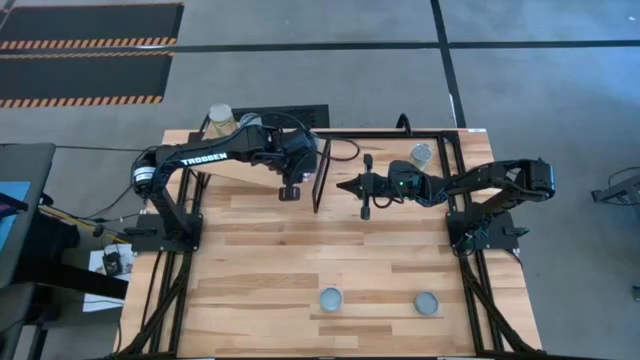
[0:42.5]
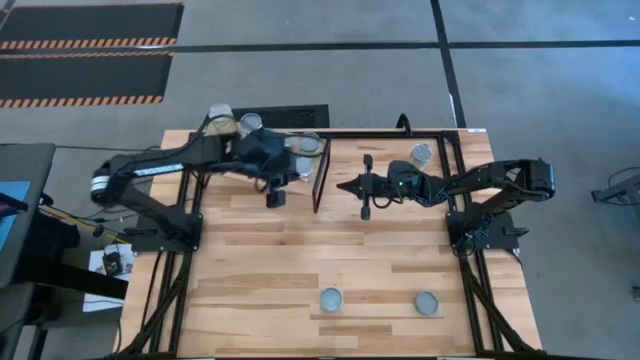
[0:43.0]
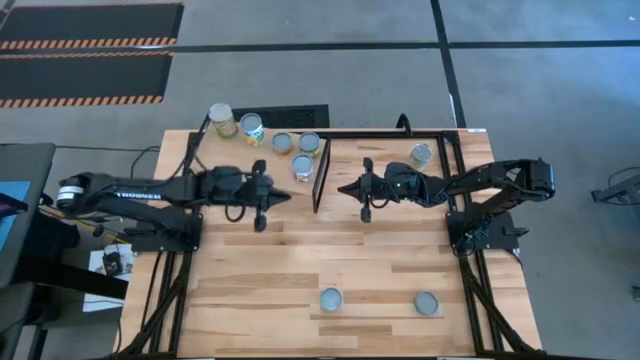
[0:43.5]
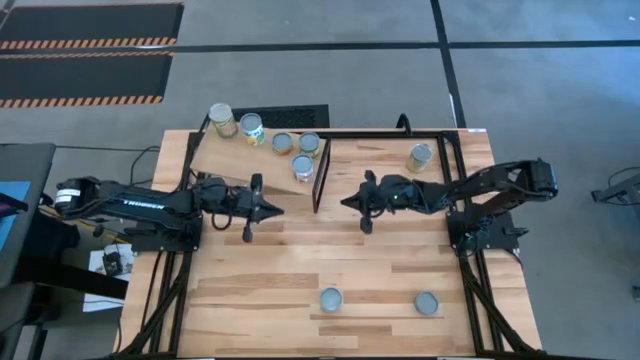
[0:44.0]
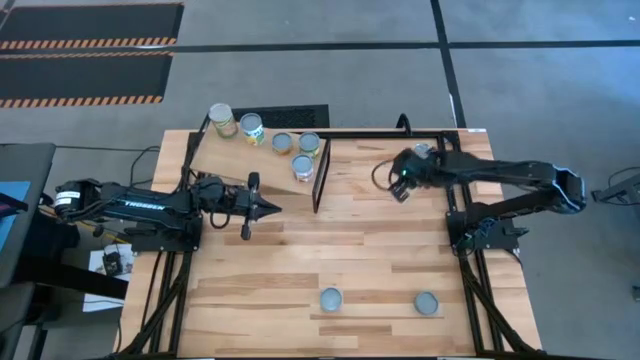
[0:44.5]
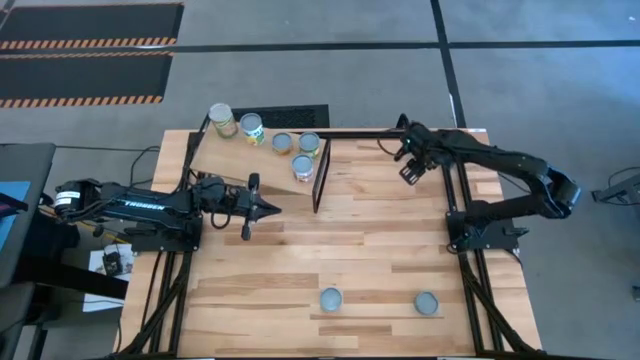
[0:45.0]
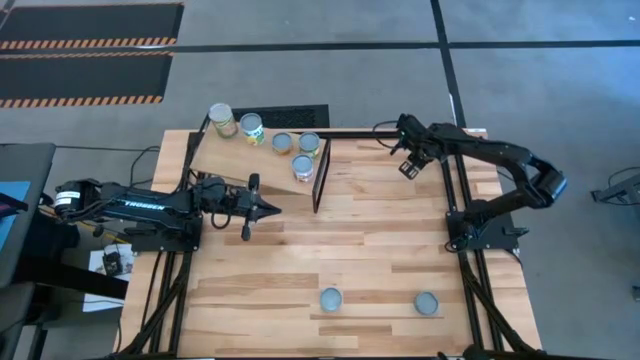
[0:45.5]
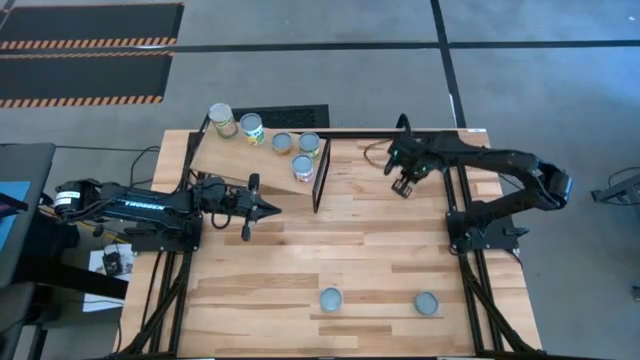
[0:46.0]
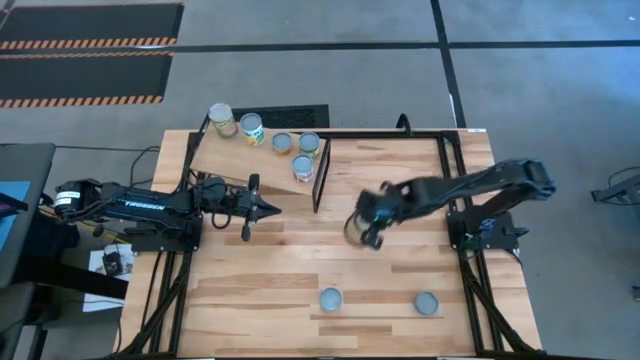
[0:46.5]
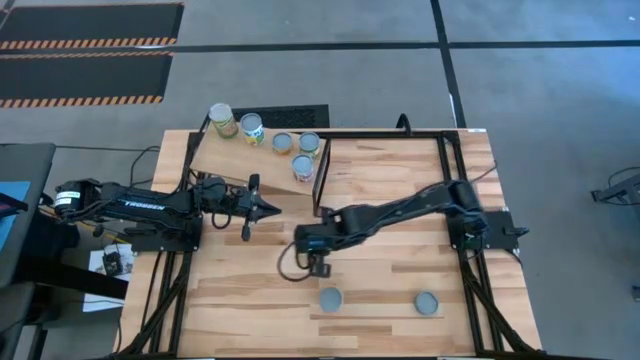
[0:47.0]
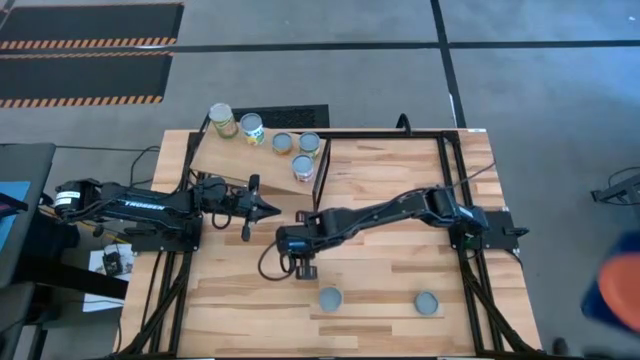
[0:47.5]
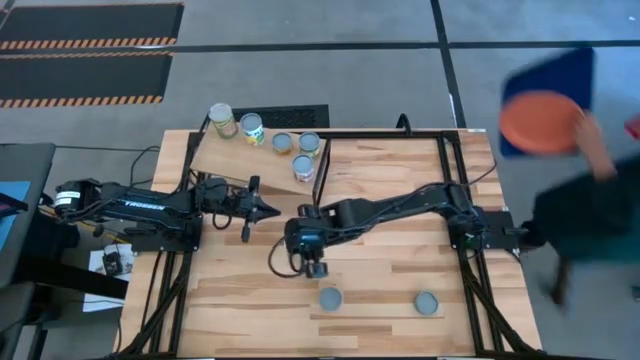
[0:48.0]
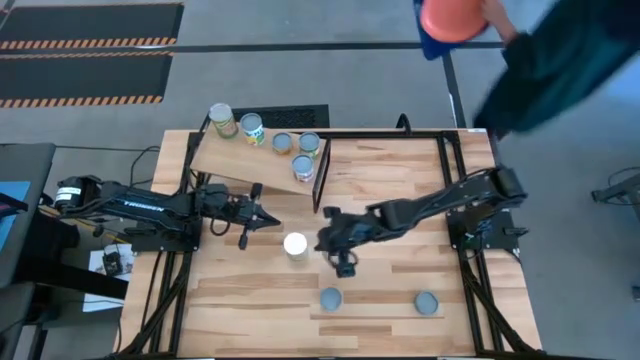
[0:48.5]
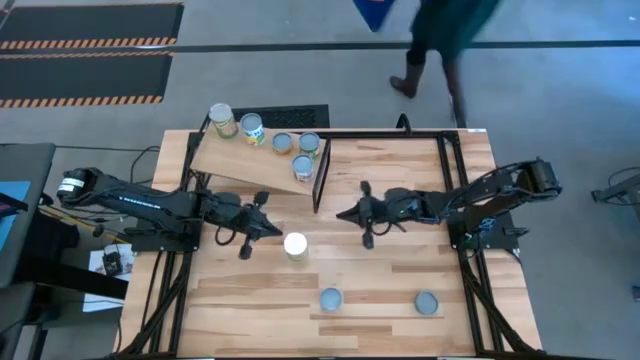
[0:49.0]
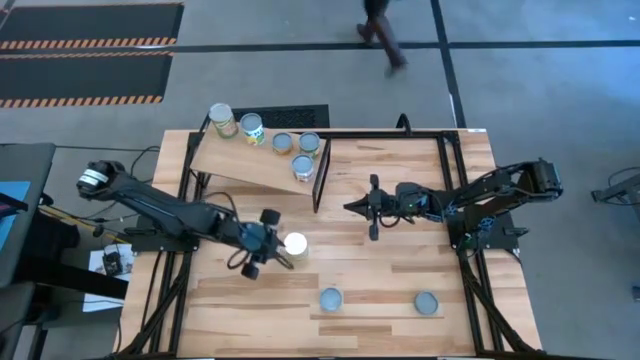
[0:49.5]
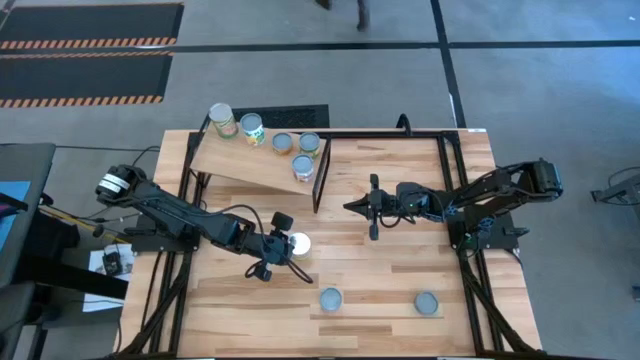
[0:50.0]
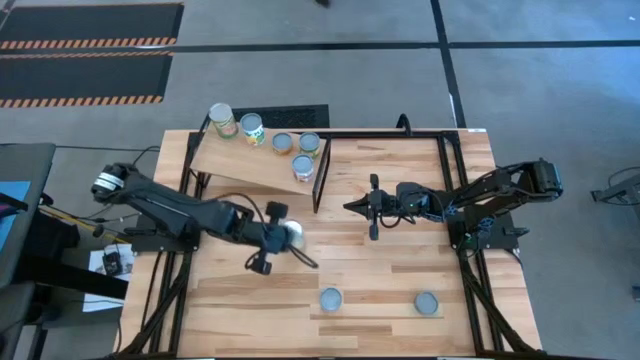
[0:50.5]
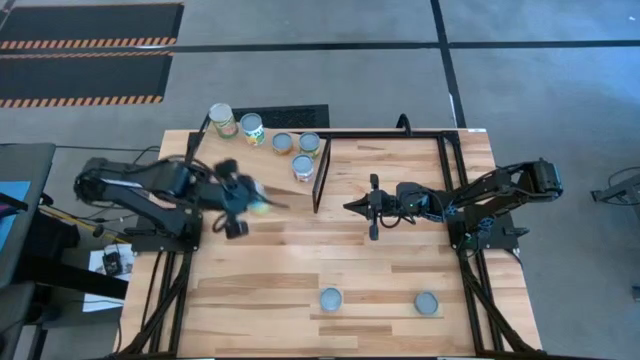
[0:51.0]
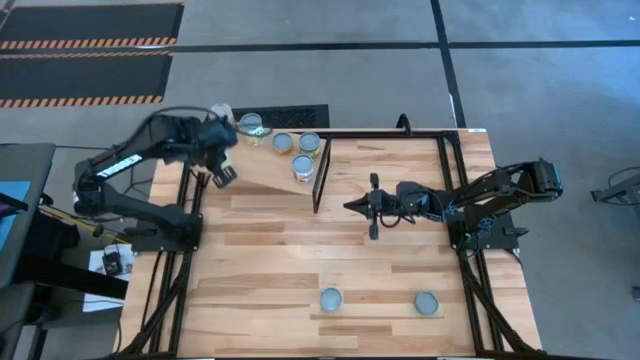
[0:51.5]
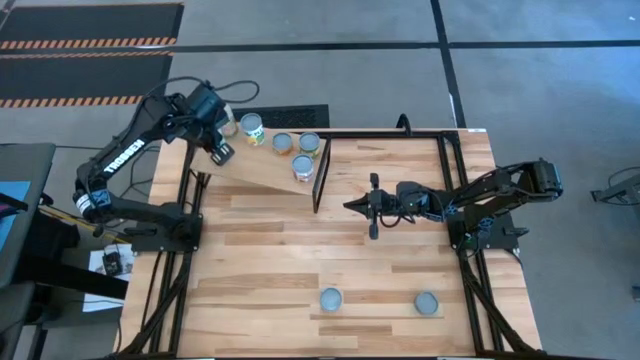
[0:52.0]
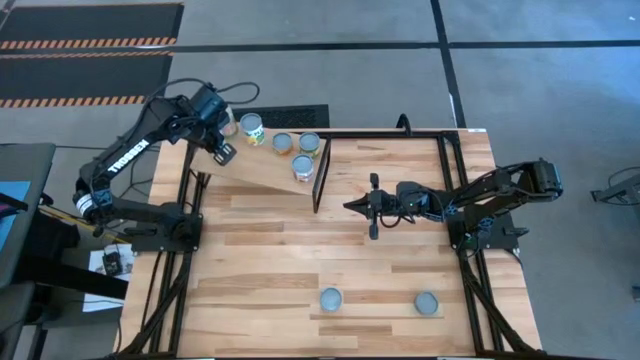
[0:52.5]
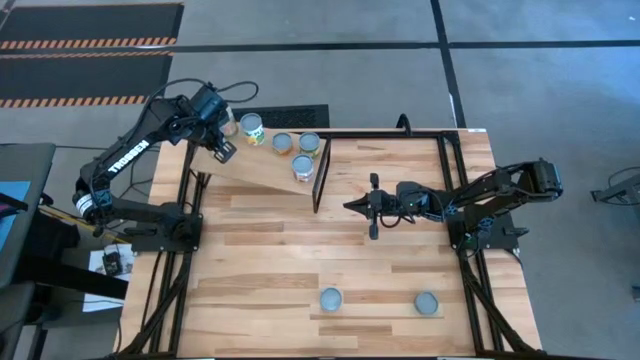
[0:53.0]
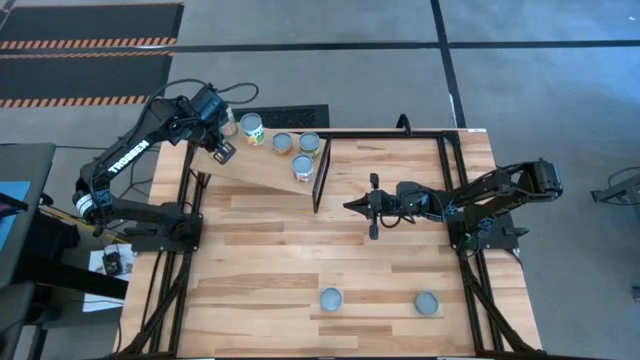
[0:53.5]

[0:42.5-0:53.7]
Task: Pick and place cans onto a shelf
Put the canned carrots on the shelf

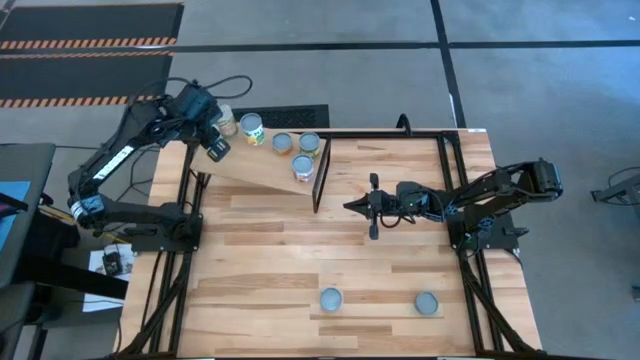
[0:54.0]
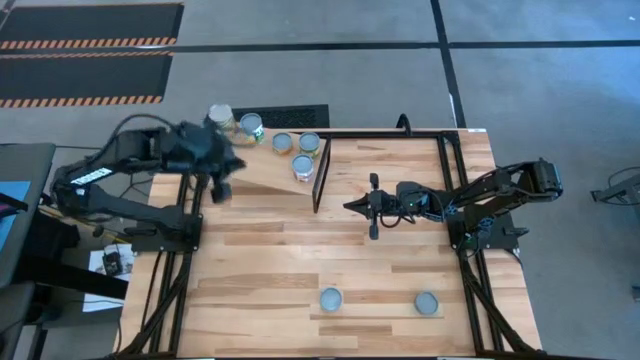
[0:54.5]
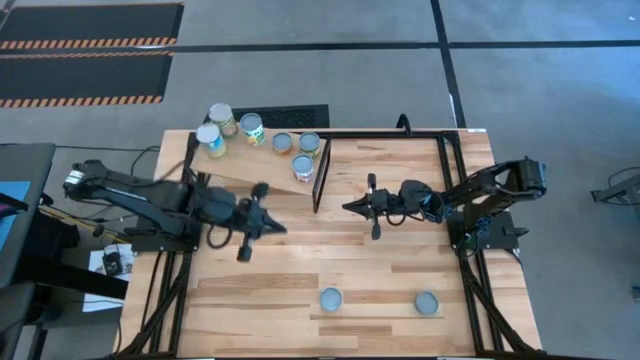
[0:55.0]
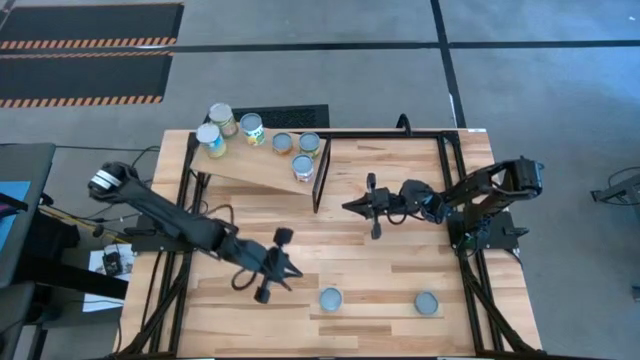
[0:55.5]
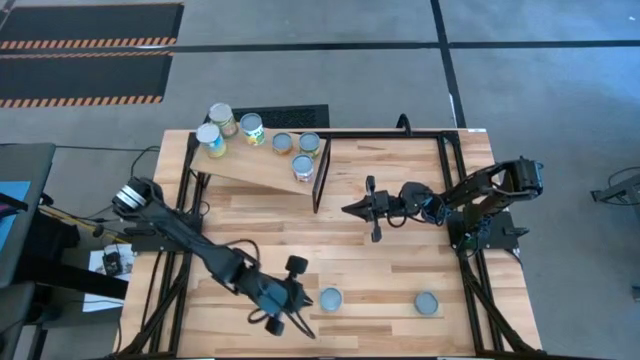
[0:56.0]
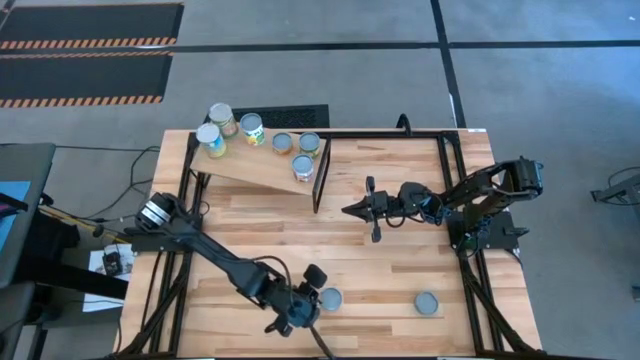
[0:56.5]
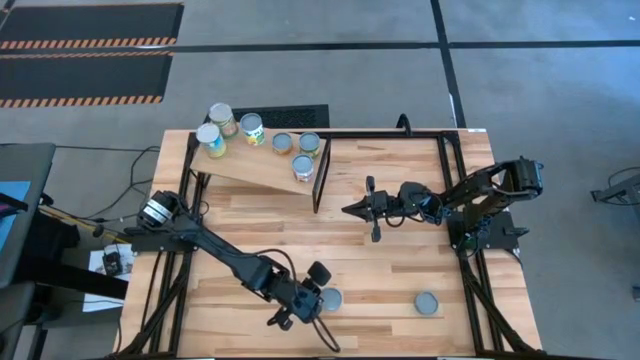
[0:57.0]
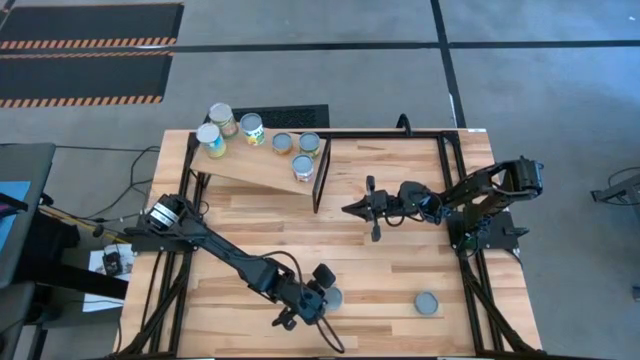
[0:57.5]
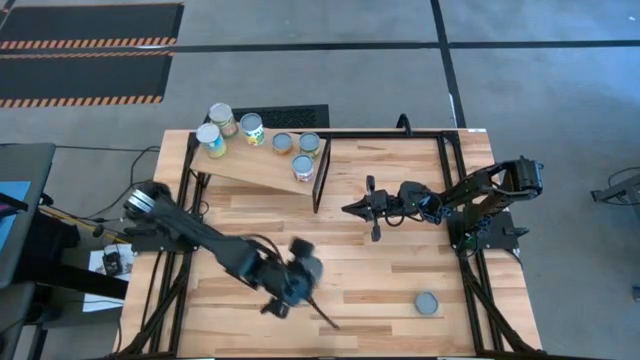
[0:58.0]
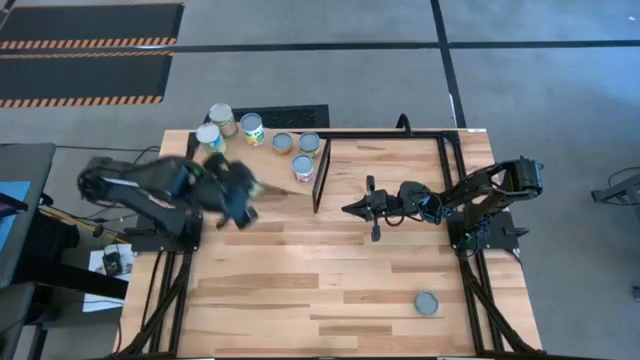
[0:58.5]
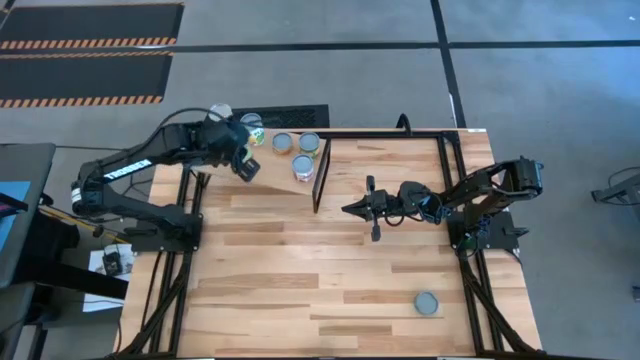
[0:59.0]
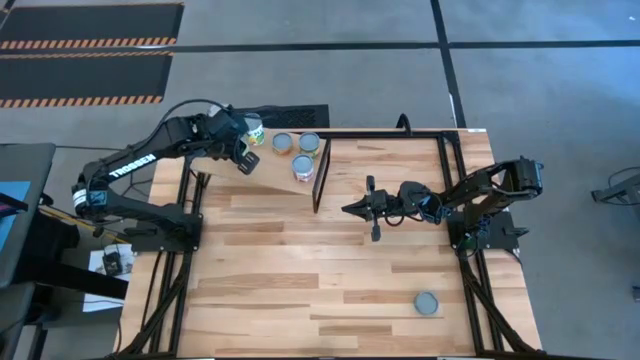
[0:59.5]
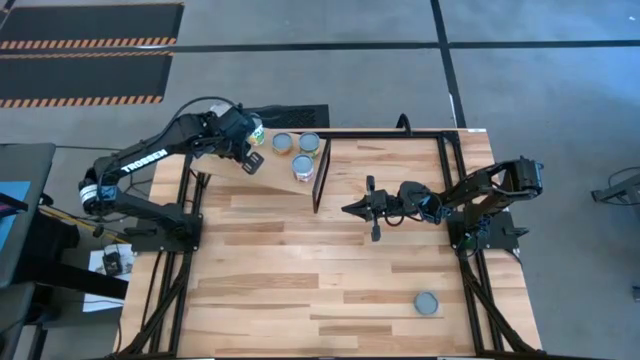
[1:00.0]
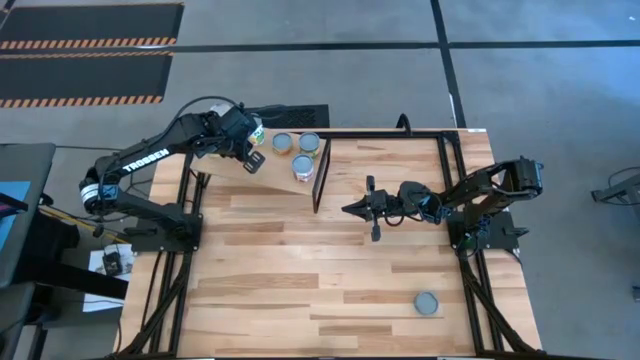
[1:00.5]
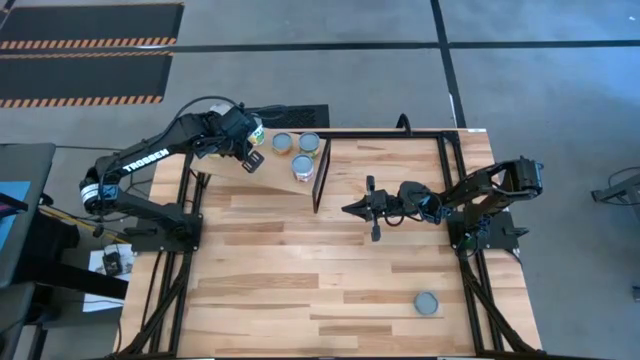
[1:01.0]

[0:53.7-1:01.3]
Put the canned spaghetti sauce on the shelf

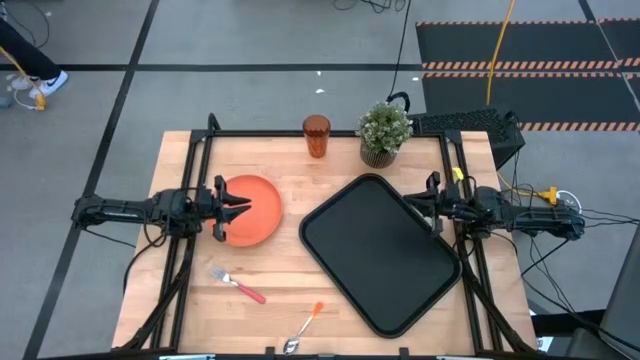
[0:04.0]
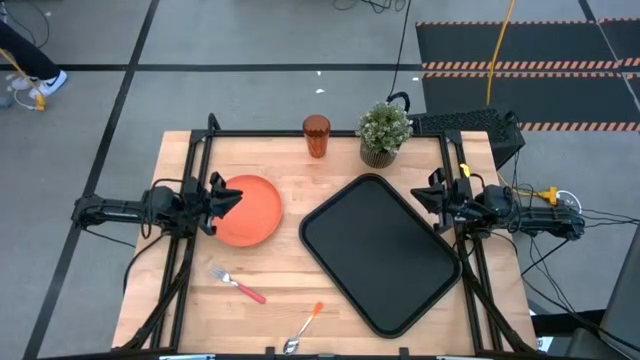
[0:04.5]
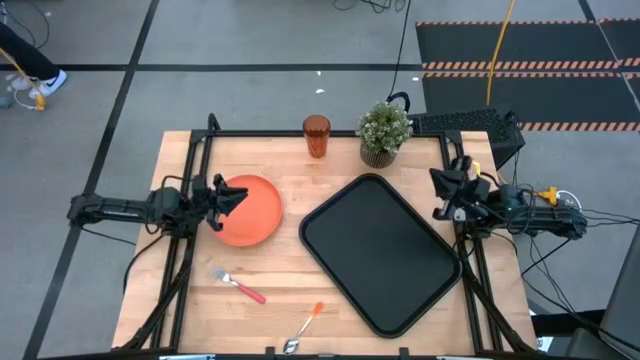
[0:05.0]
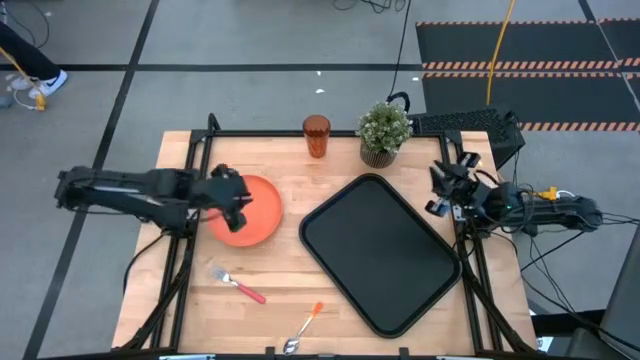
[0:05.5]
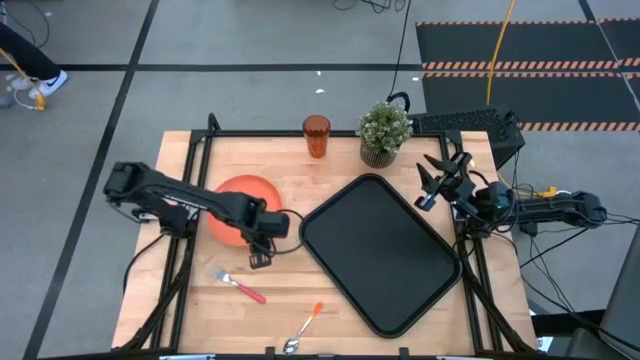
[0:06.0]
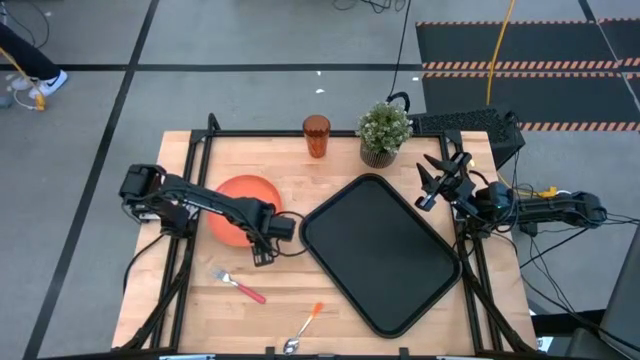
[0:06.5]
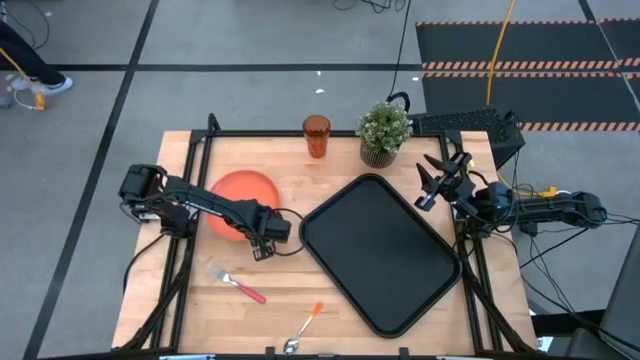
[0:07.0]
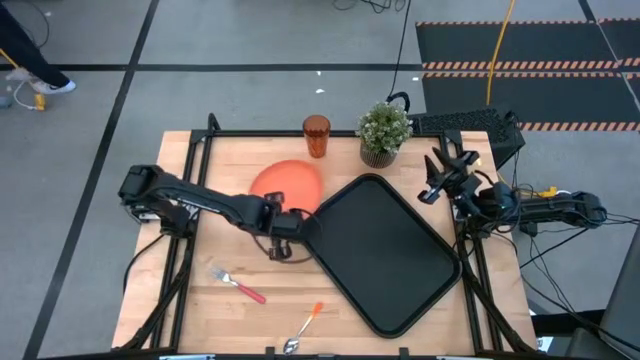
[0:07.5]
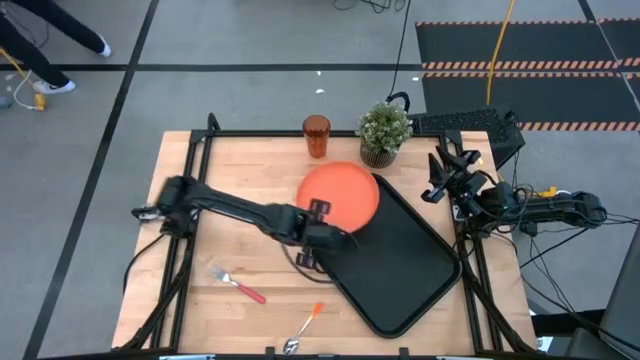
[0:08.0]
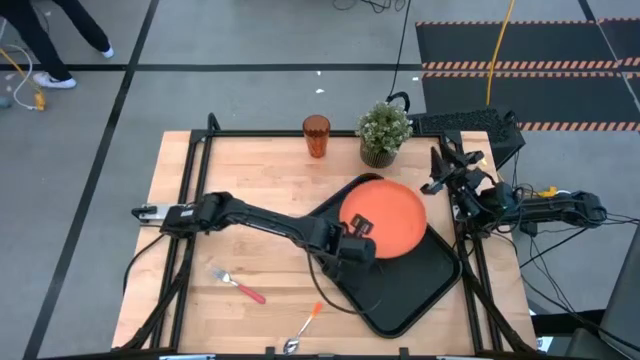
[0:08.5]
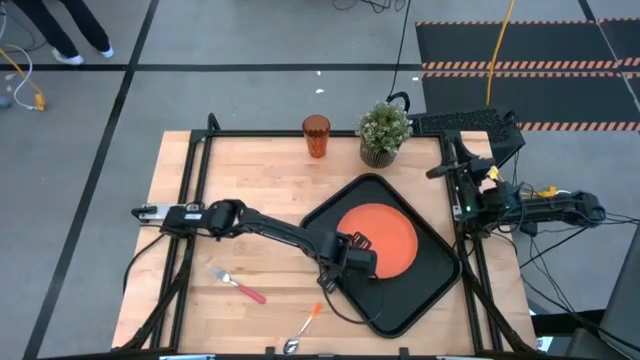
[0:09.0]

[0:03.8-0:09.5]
Task: Pick and place plate/cup/fork/spoon on tray
Put the orange plate on the black serving tray
